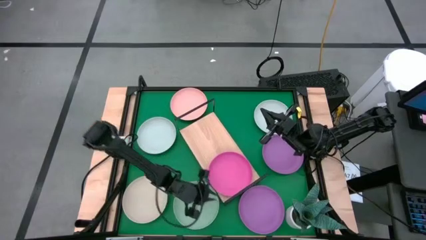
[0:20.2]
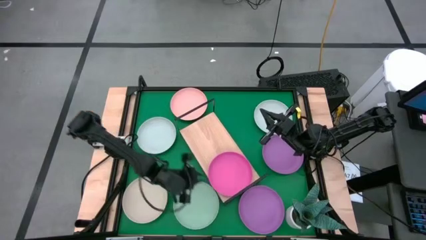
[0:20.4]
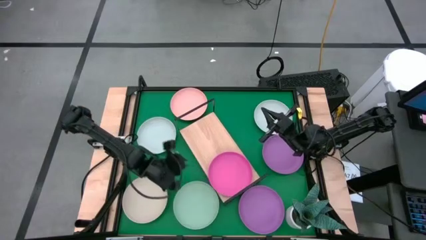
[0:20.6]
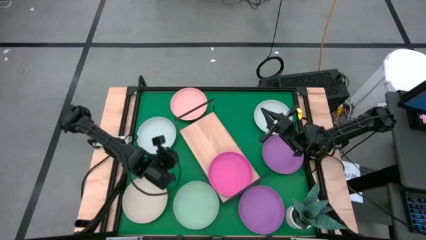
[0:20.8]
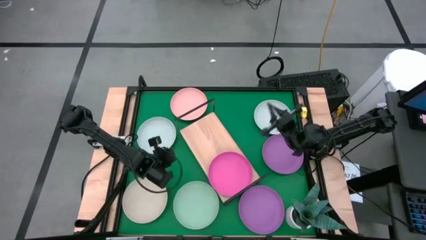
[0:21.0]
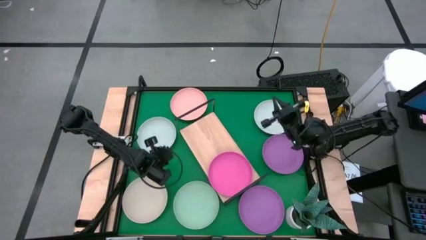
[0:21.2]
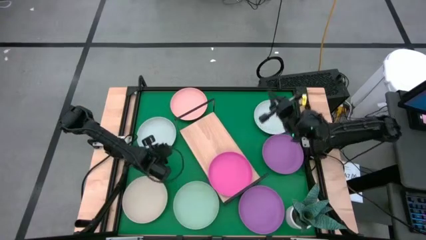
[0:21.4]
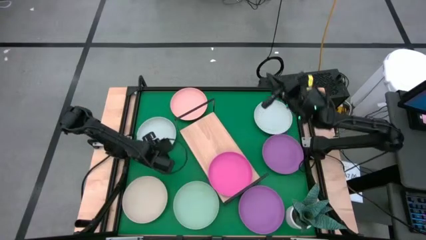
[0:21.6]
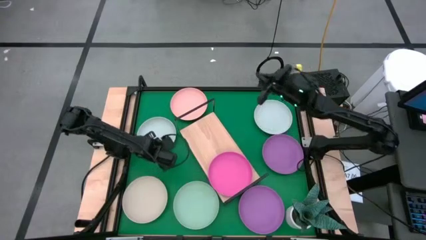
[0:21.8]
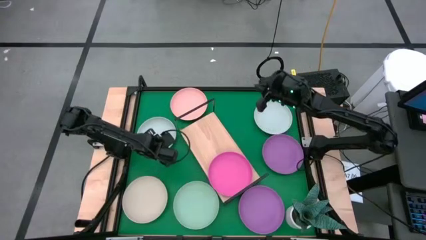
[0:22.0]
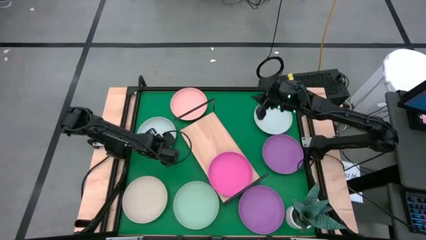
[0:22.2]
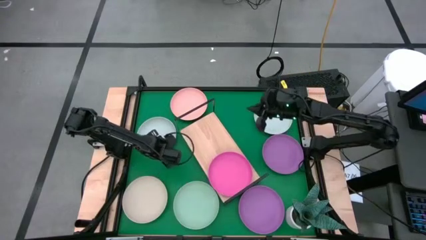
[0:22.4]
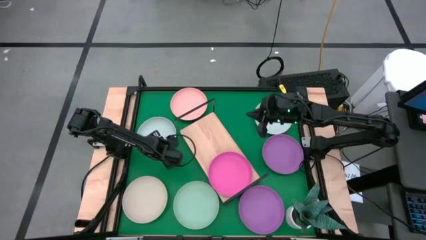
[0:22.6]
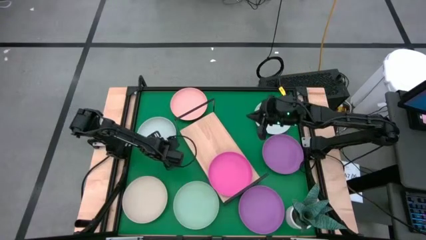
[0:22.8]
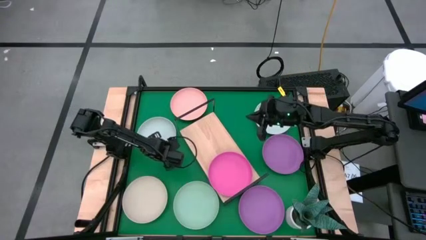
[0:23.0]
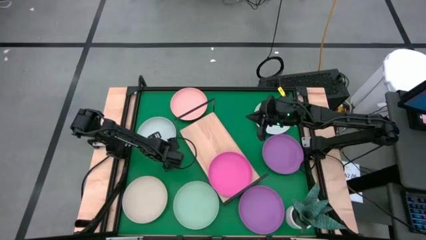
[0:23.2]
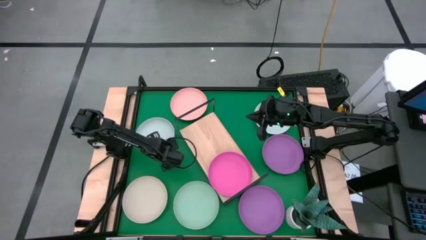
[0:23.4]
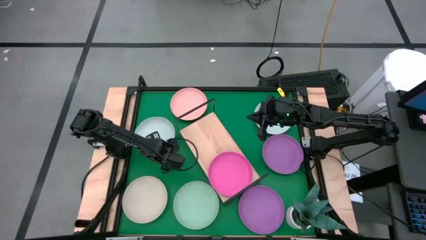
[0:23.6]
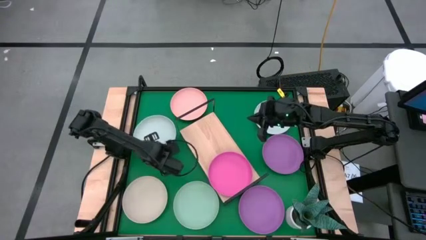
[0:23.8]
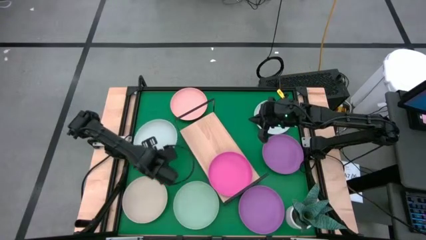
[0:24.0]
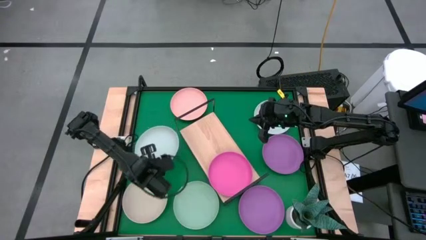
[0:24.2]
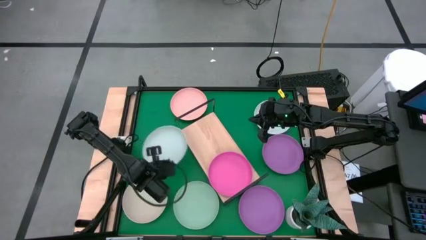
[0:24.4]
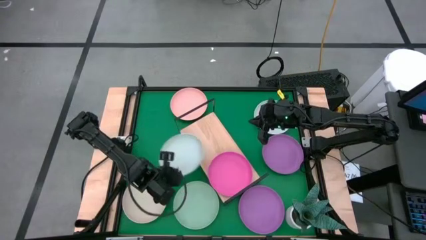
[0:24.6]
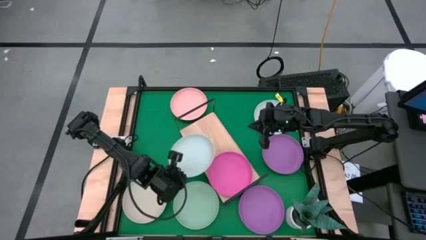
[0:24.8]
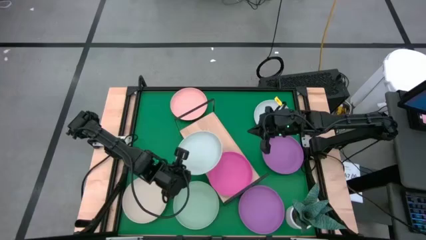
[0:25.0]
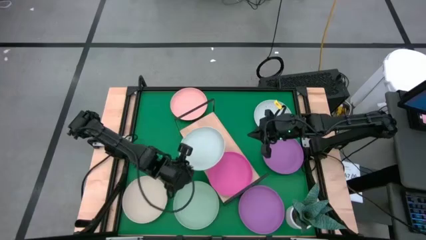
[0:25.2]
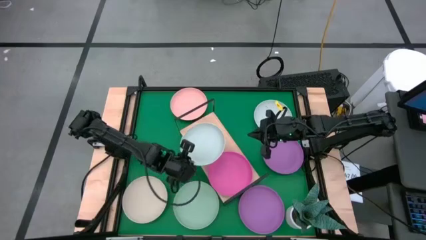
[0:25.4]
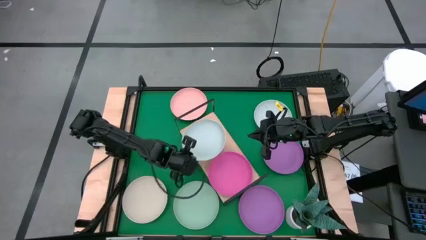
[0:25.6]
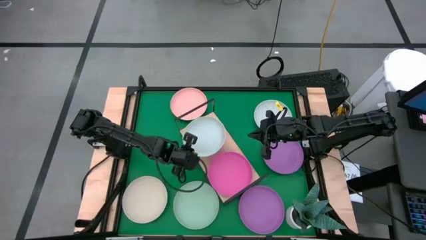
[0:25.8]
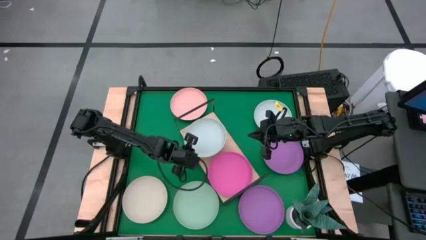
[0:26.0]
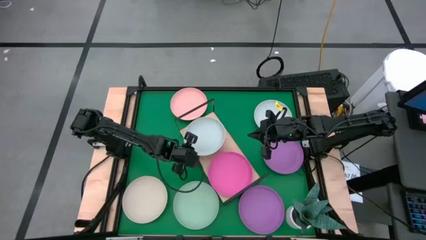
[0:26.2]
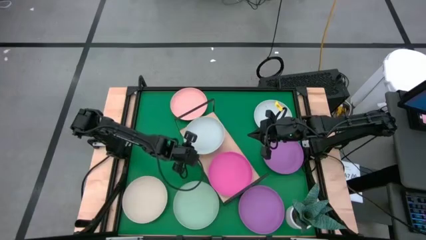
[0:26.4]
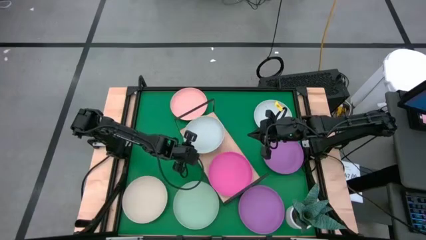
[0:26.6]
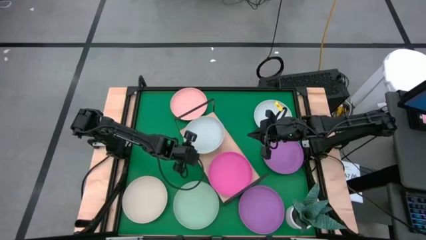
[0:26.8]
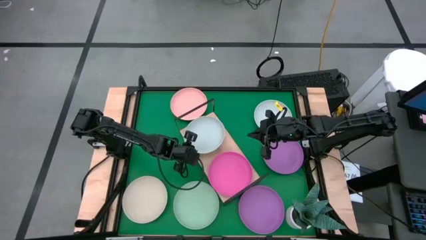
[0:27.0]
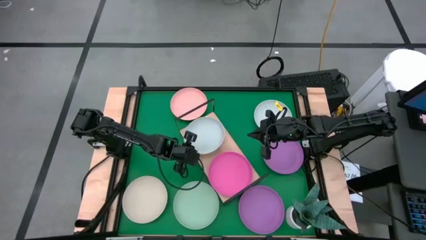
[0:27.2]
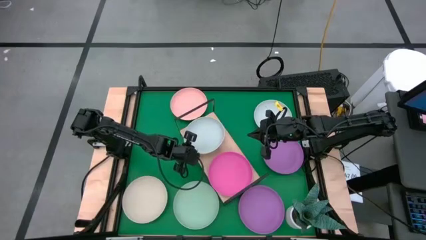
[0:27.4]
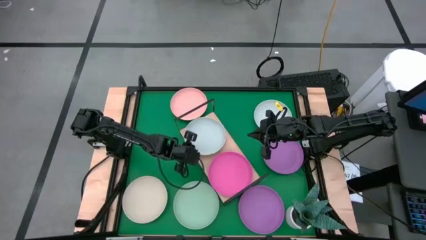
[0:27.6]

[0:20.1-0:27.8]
Task: Place and stack plates onto a shelf
Put the left gray plate on the shelf

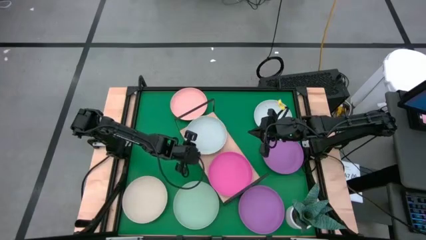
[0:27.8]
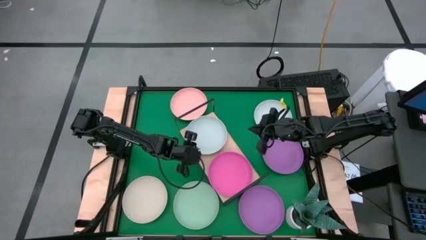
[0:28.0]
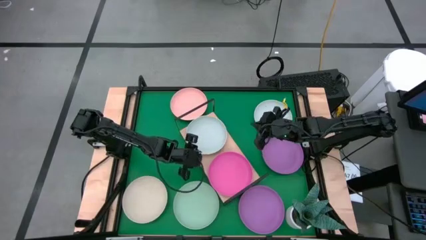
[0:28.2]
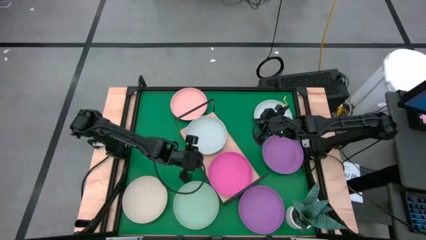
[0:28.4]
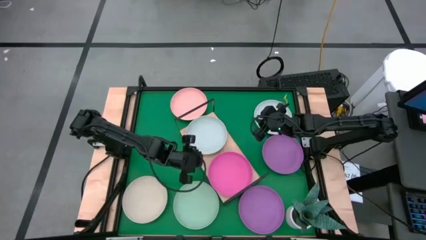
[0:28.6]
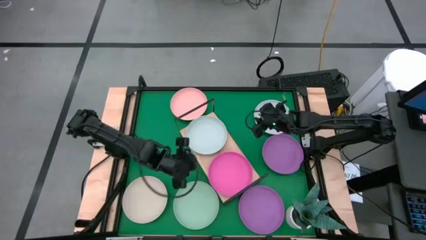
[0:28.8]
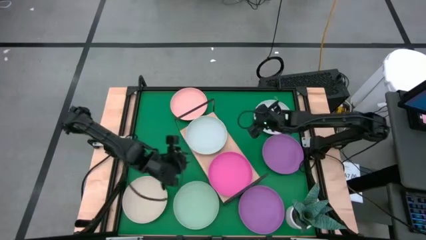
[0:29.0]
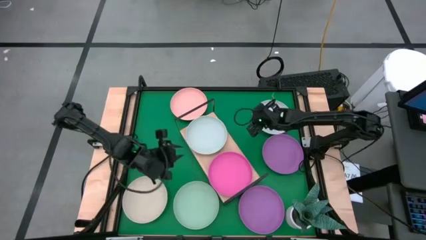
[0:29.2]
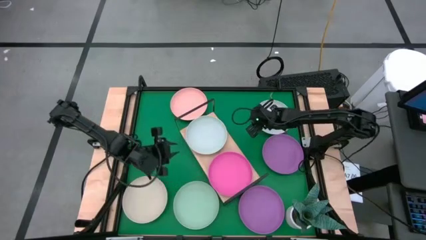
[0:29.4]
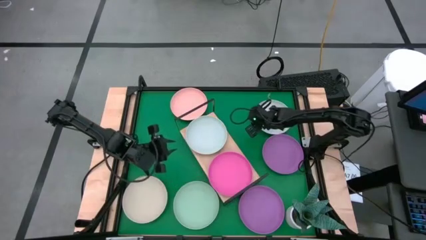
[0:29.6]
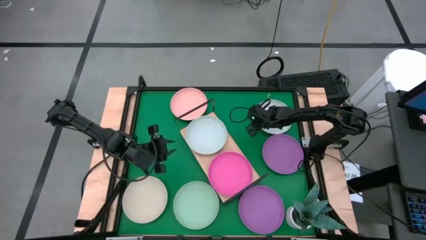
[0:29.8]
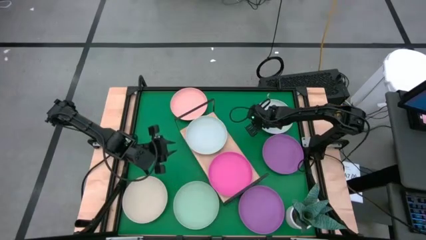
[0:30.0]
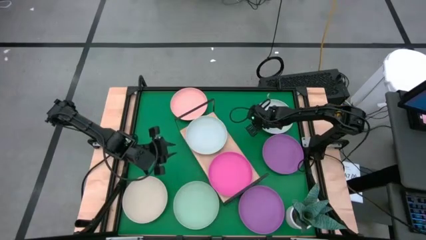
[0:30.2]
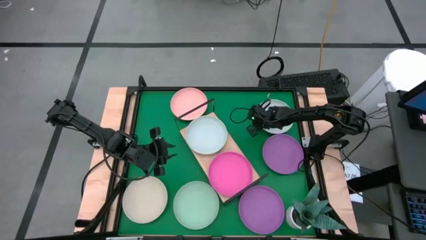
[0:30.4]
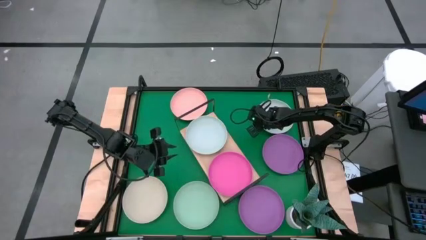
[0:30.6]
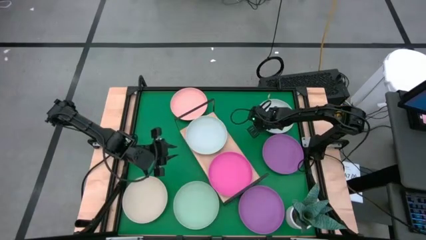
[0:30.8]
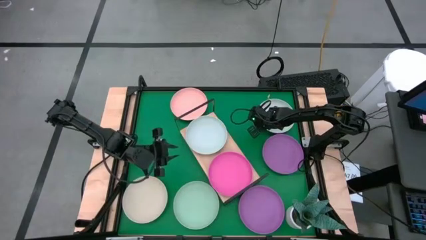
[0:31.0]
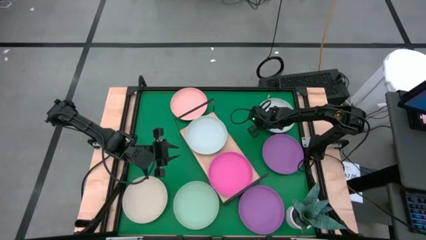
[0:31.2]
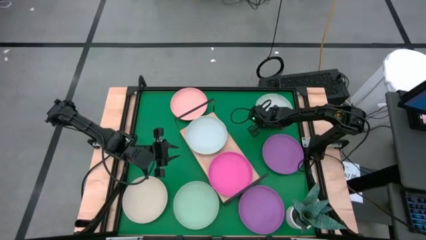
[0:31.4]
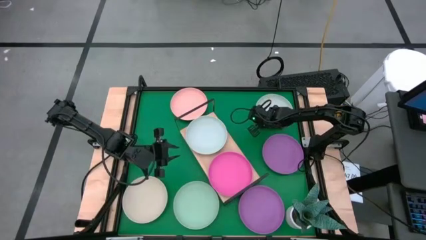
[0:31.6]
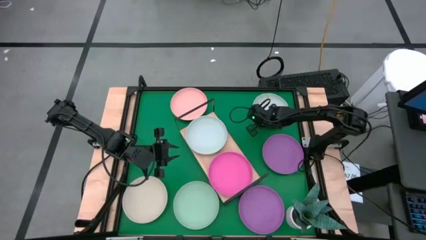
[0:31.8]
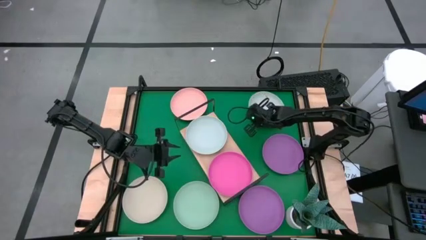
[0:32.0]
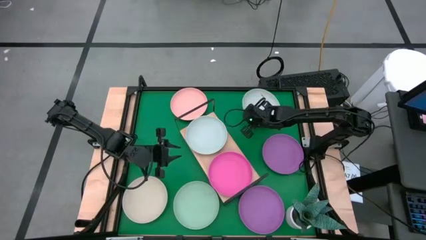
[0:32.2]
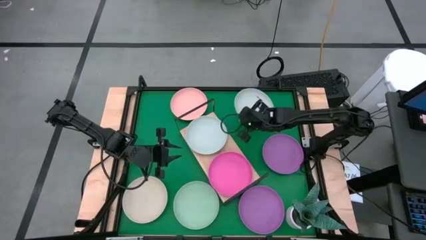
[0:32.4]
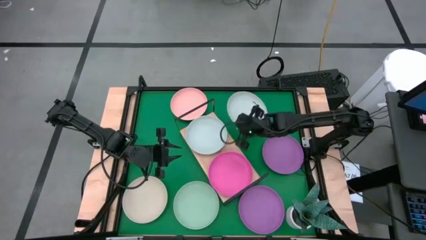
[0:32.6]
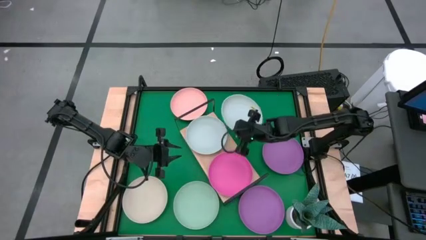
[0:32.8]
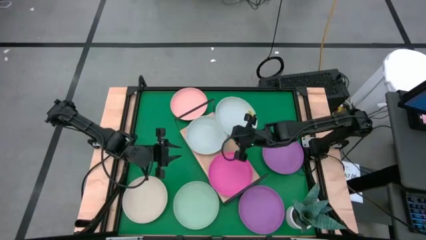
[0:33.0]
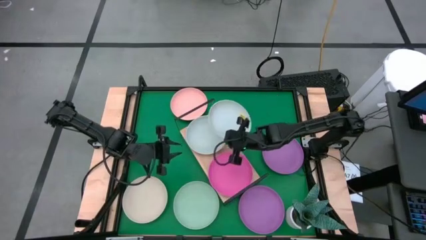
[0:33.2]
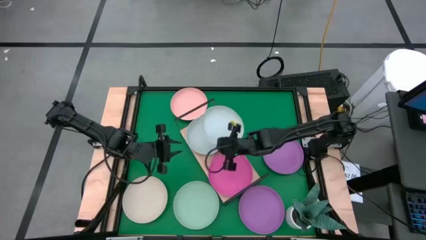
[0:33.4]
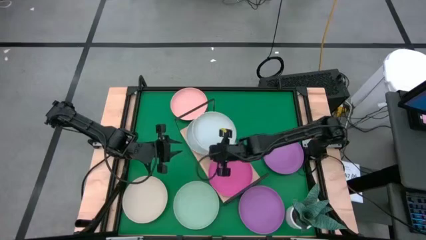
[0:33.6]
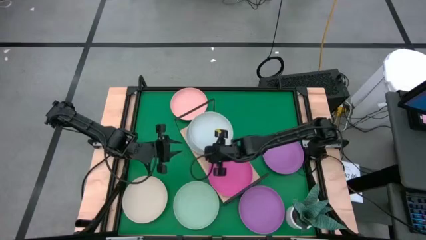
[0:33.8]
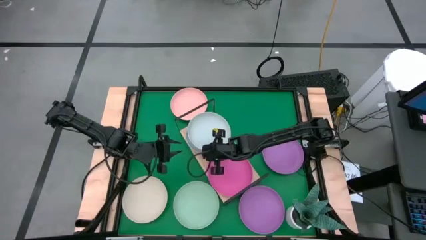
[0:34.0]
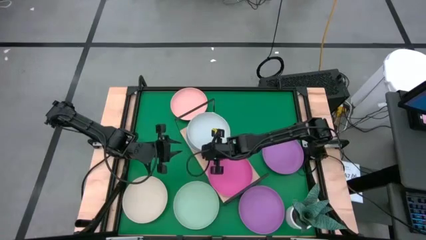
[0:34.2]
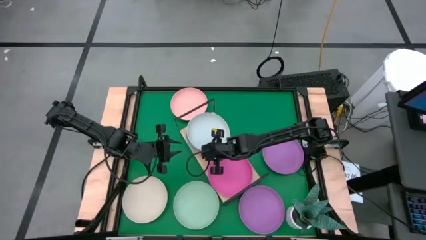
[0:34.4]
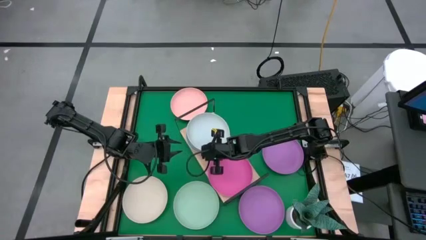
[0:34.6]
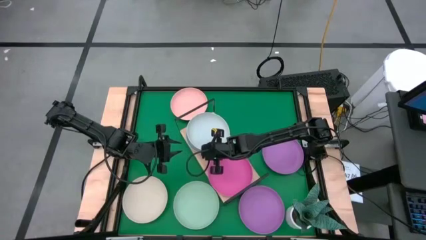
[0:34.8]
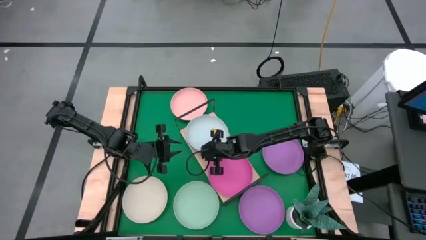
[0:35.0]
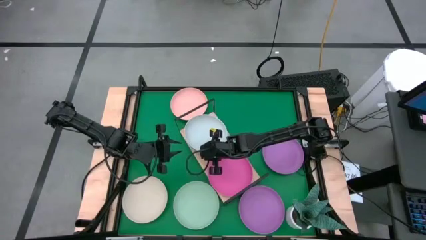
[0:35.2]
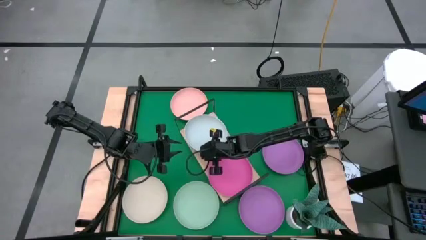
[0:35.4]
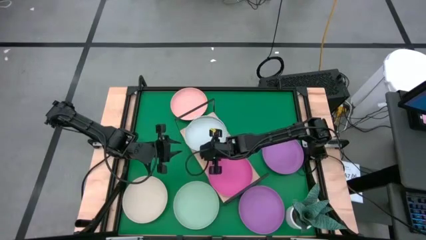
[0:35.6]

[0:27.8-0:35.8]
Stack the gray plate on top of the gray plate on the shelf
